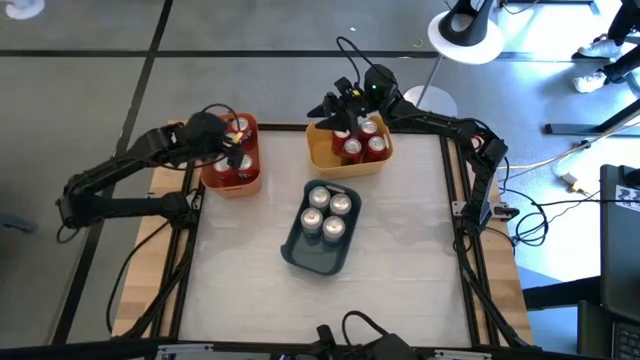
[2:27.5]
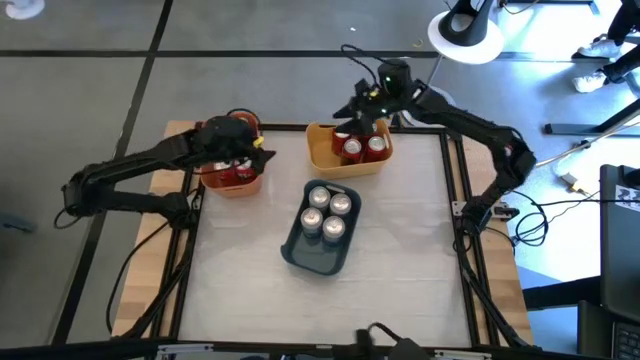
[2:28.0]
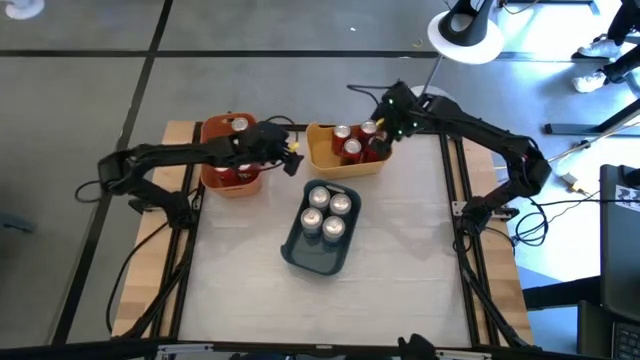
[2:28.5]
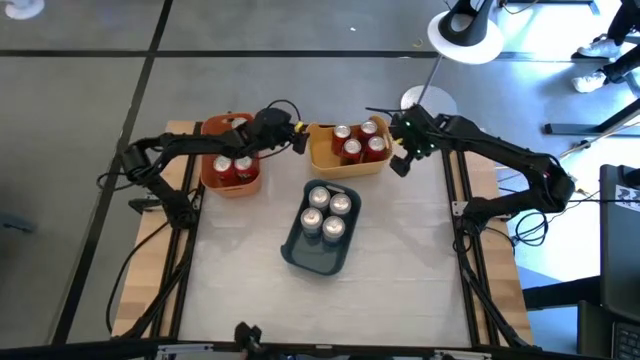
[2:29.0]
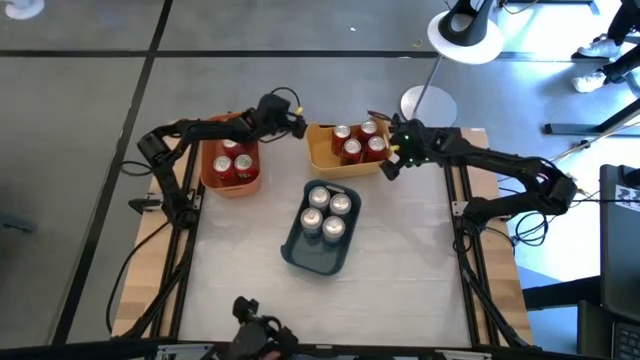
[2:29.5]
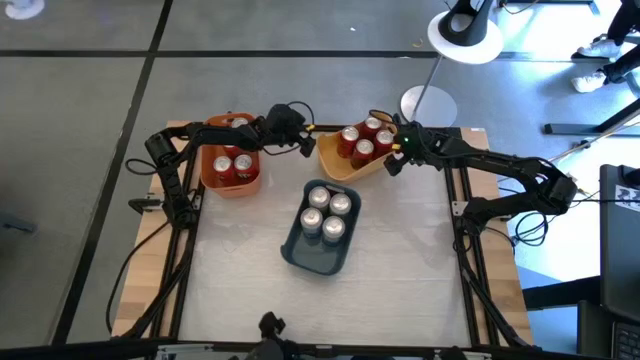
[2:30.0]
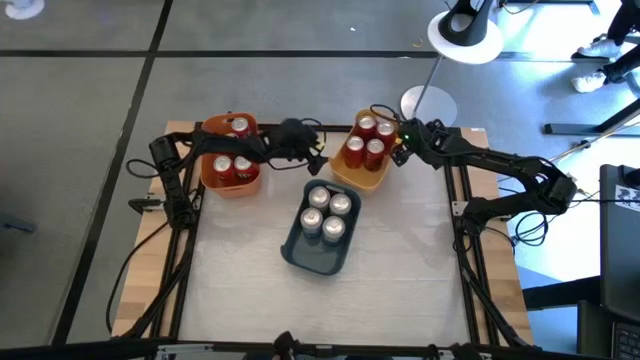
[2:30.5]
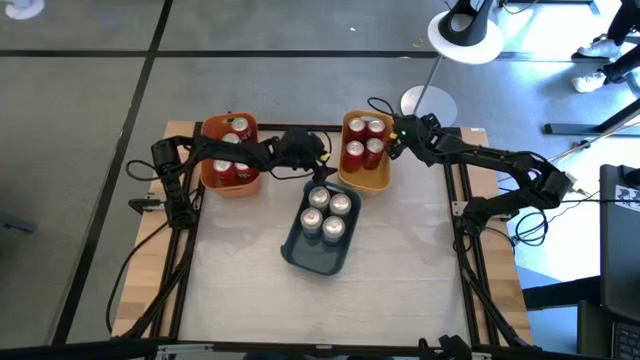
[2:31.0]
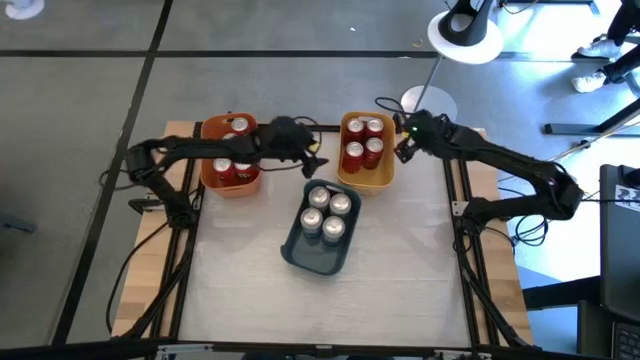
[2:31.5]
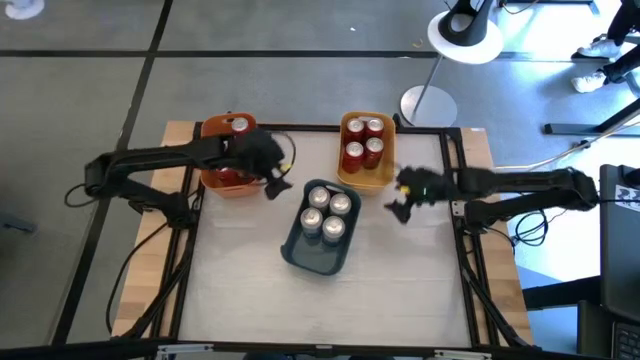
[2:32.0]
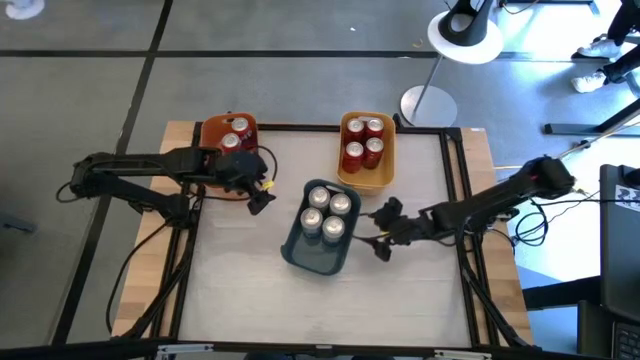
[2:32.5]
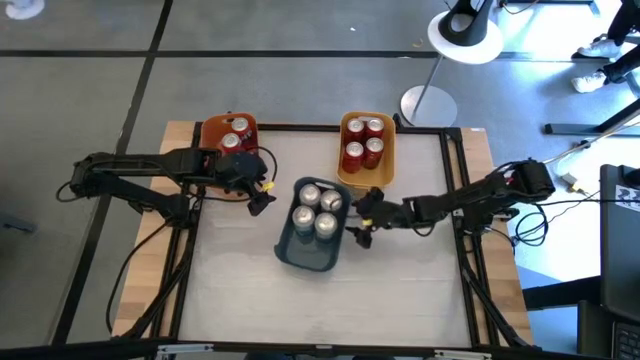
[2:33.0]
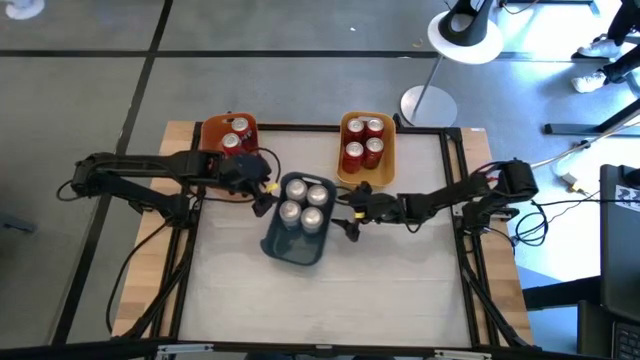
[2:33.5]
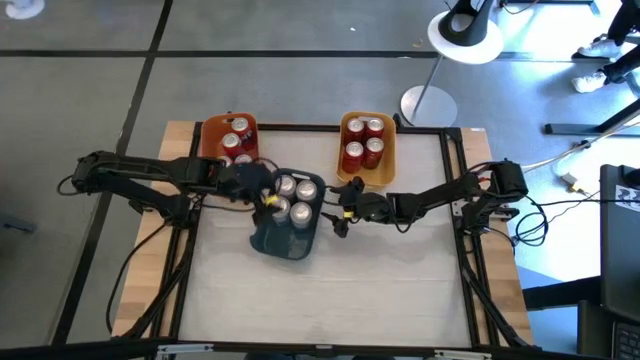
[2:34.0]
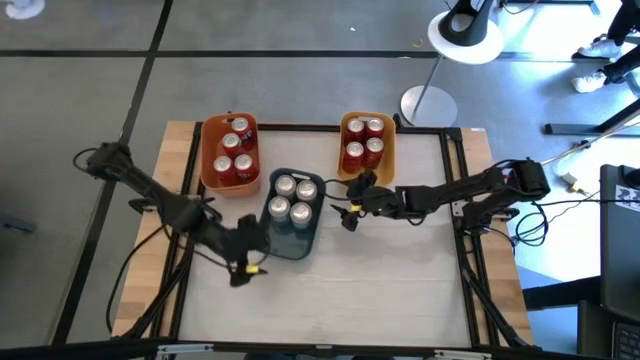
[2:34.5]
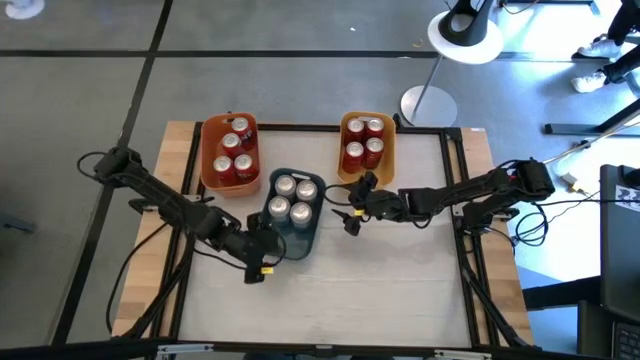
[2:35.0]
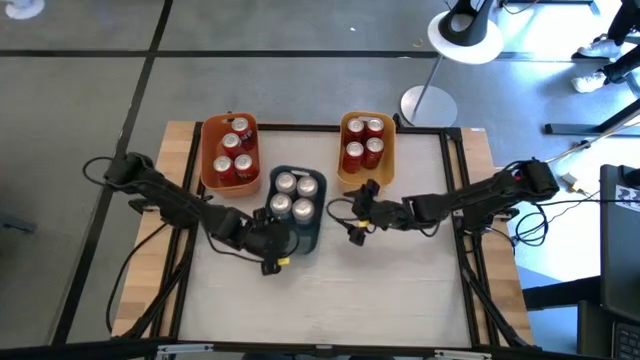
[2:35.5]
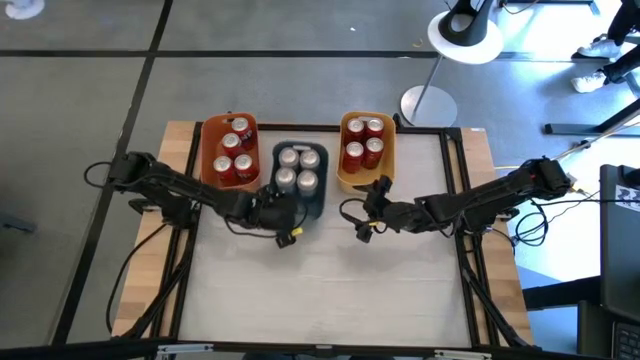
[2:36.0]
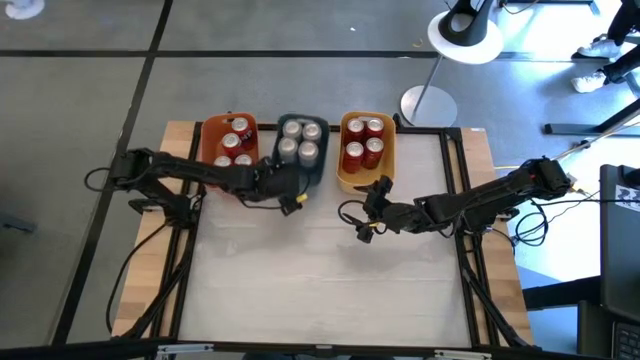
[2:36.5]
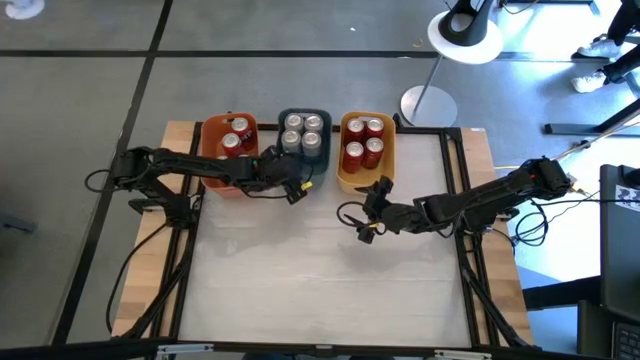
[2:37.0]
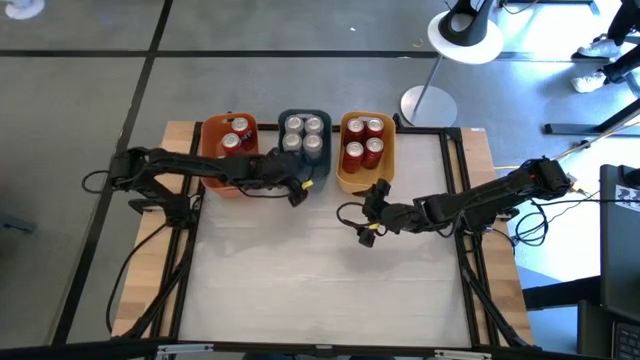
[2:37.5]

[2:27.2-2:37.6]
Task: Sort soda cans
Adjust all the bins

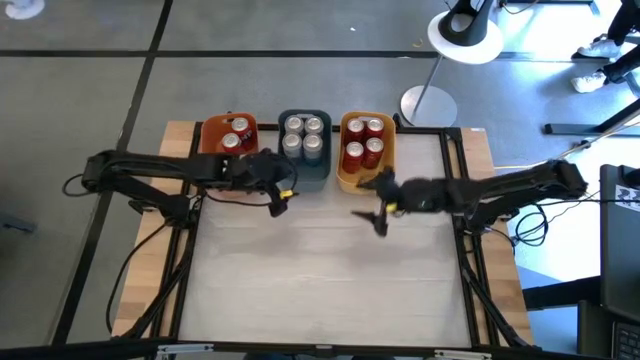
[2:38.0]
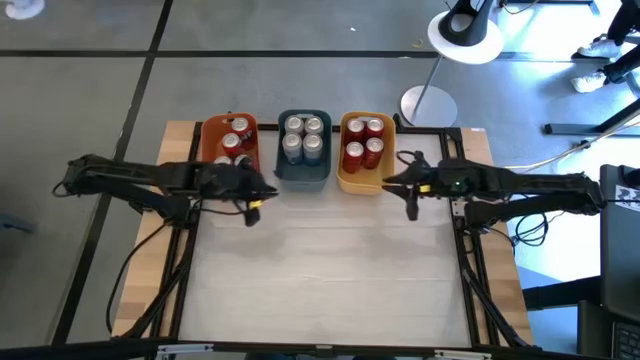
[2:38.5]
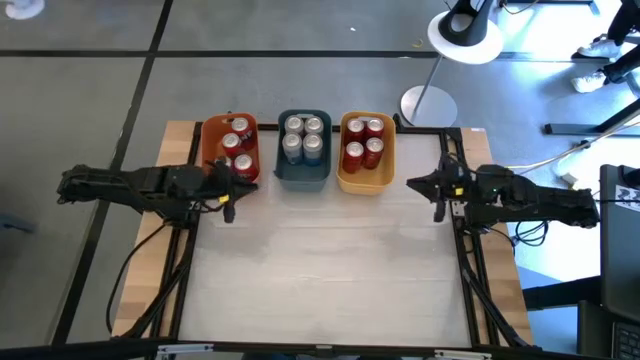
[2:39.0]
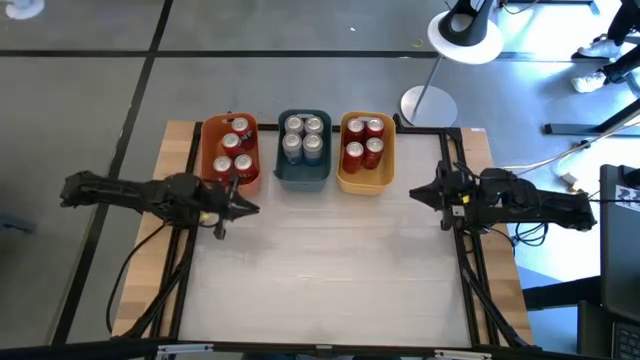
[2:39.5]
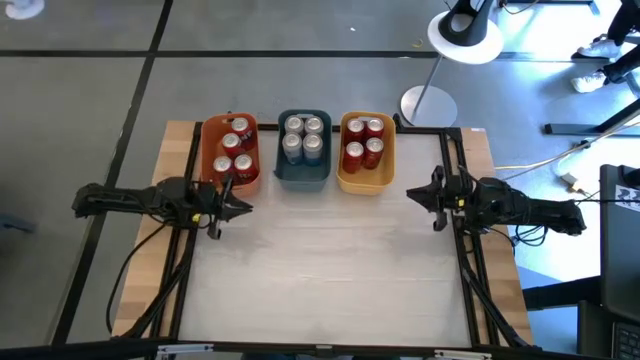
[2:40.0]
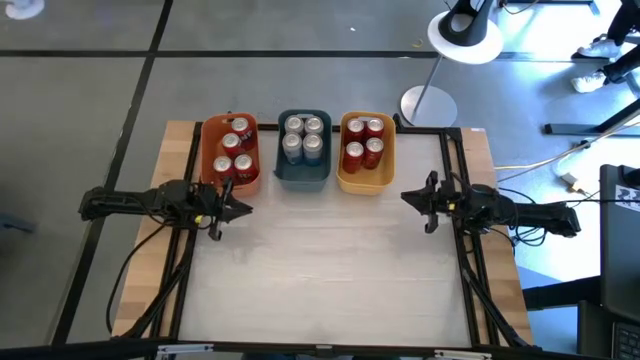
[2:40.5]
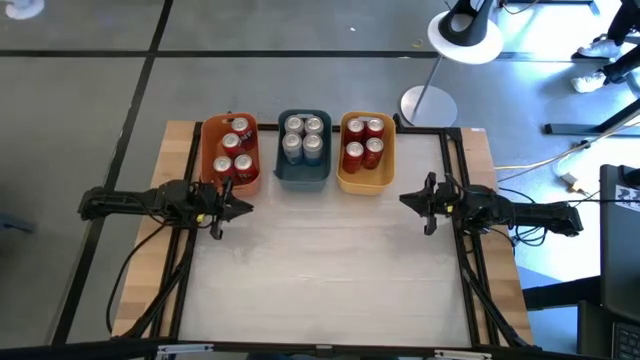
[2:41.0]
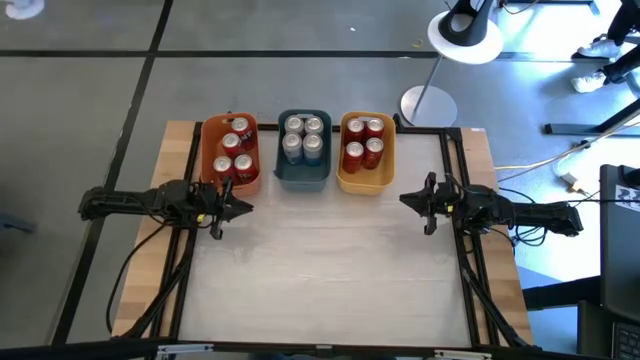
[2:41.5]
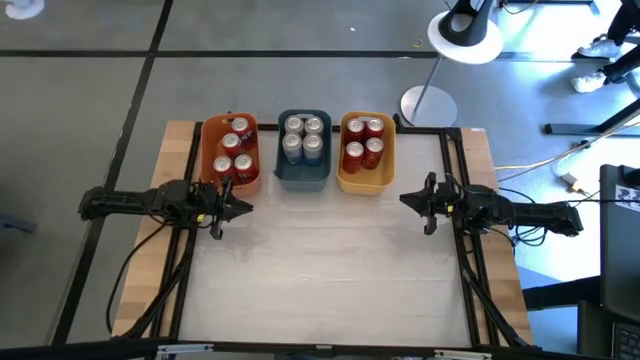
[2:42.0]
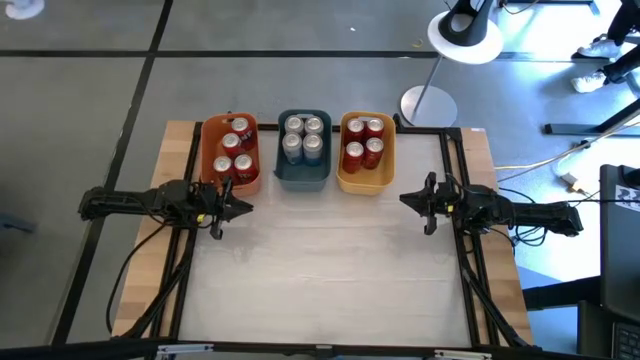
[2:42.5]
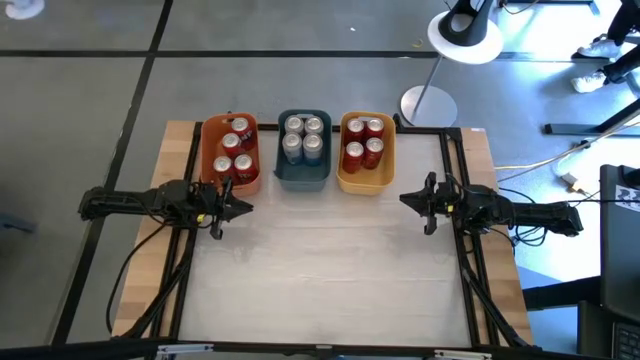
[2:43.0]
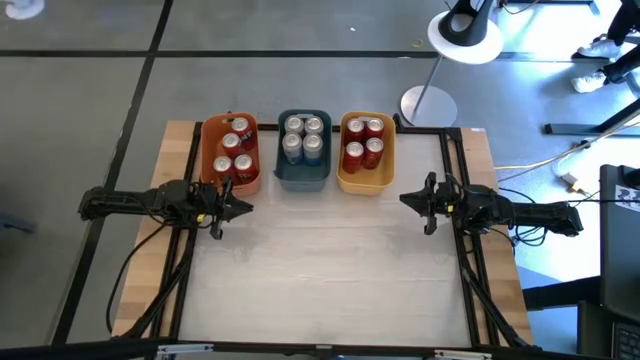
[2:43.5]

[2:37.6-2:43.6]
Return to Home Position

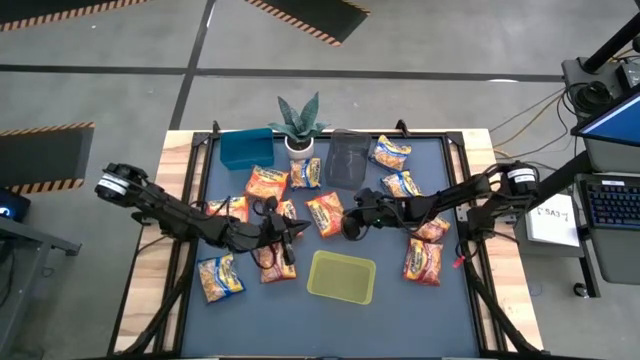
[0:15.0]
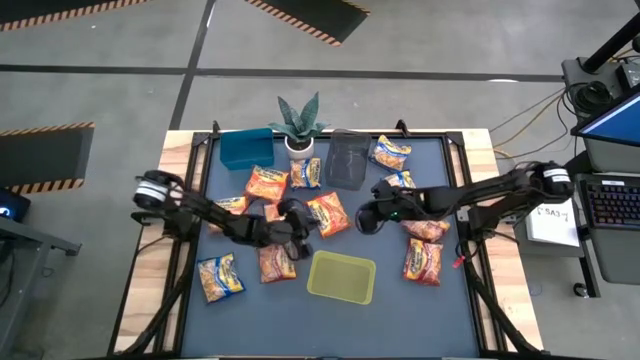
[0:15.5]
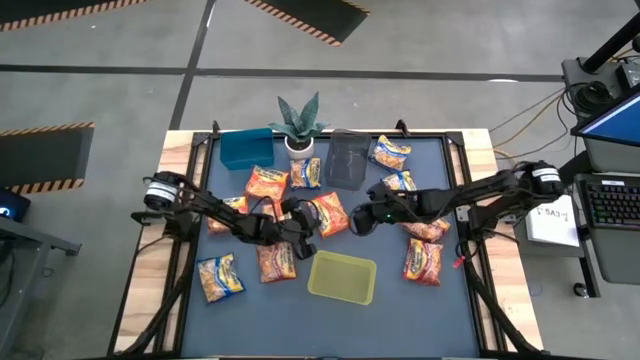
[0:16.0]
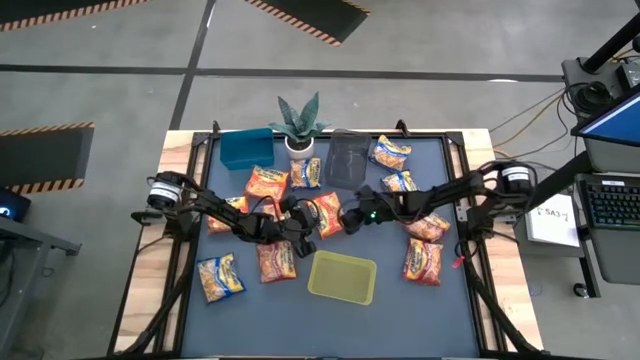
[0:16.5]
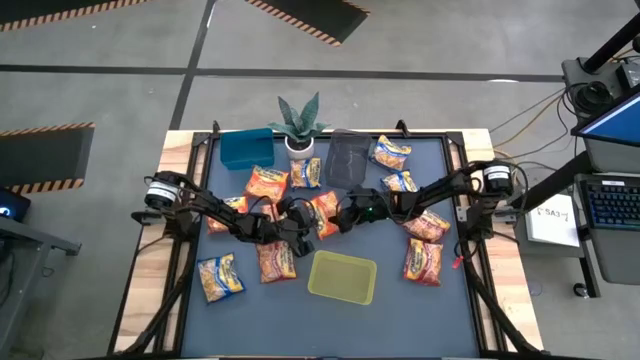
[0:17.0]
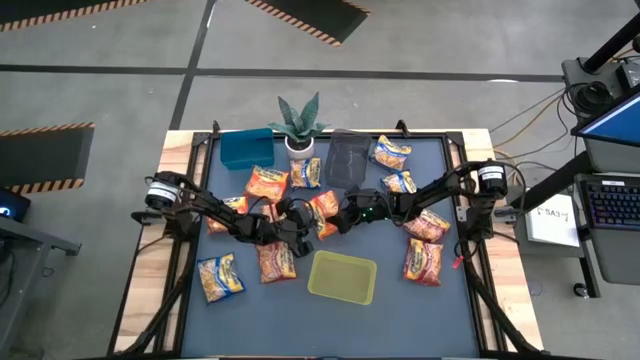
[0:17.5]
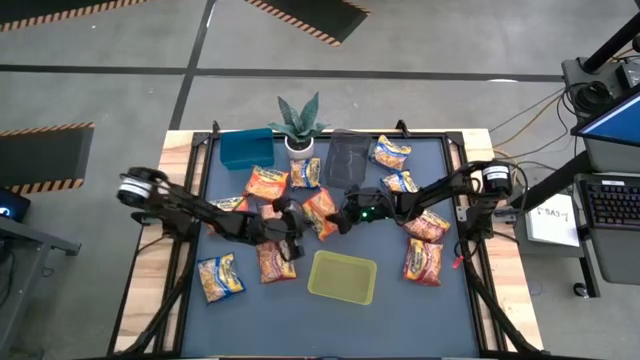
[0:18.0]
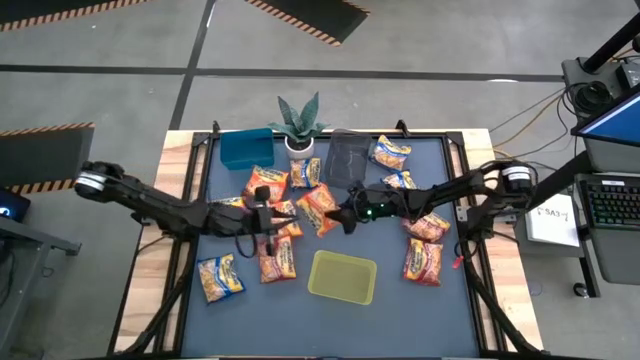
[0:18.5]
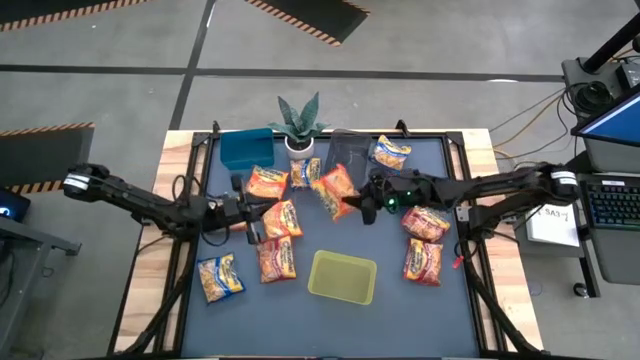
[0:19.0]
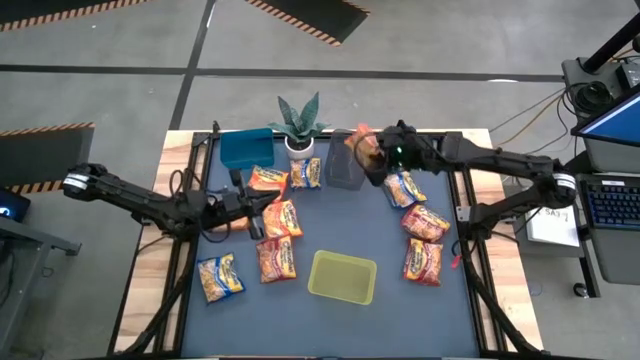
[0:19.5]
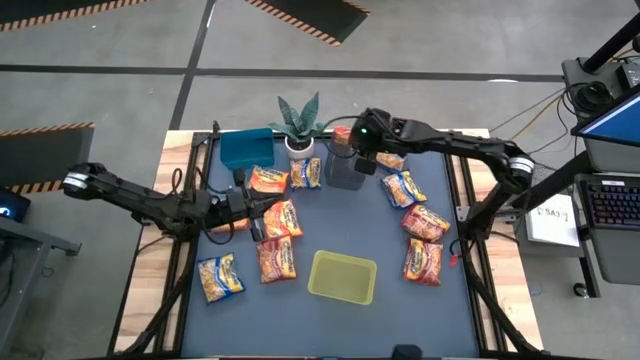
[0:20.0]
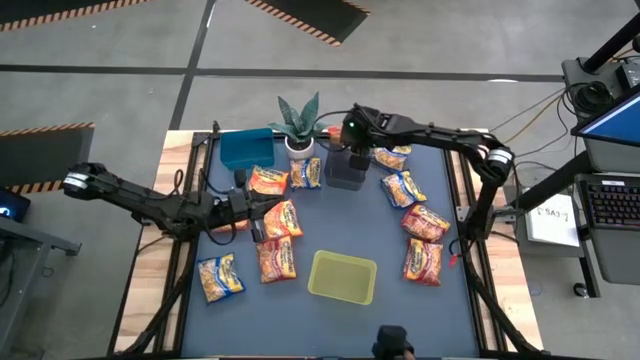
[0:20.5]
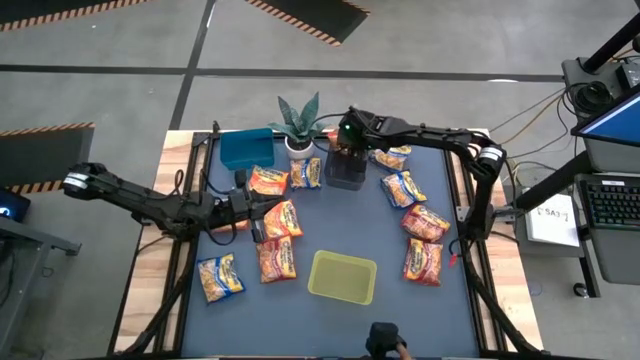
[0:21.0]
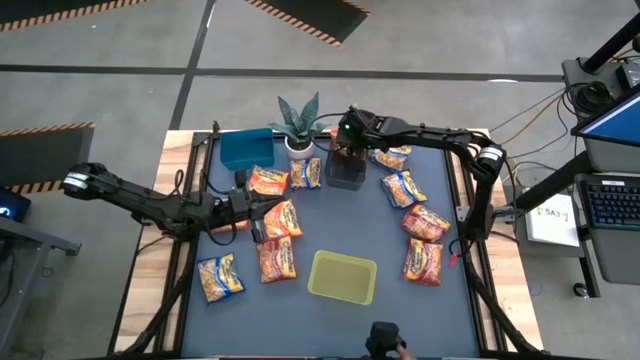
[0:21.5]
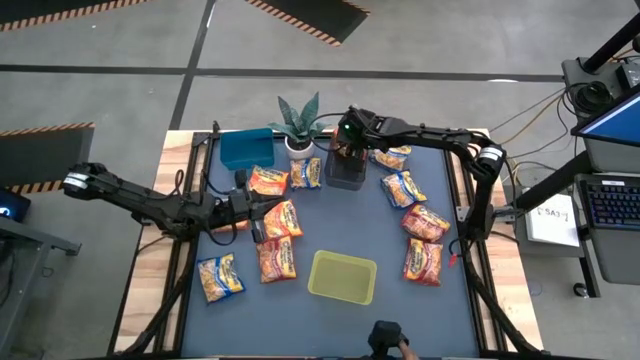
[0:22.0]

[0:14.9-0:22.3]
Task: Sort Maruchan noodles
Put the orange bag into the black bin
